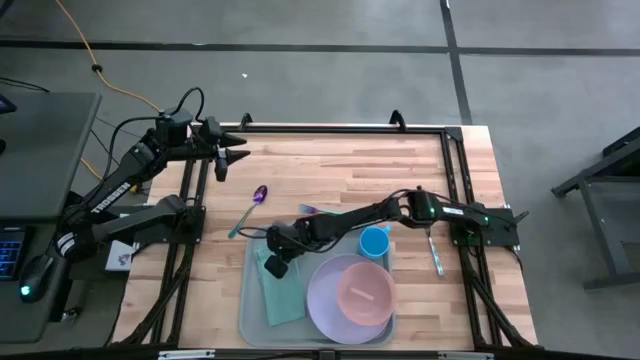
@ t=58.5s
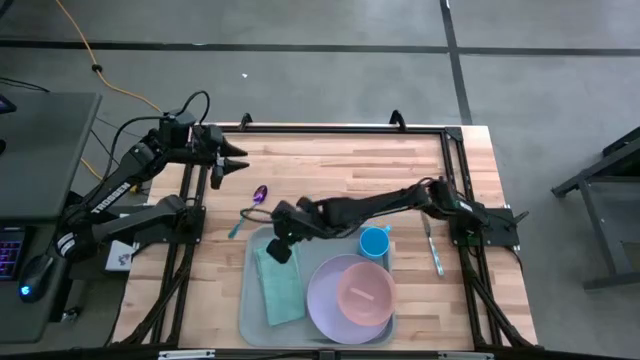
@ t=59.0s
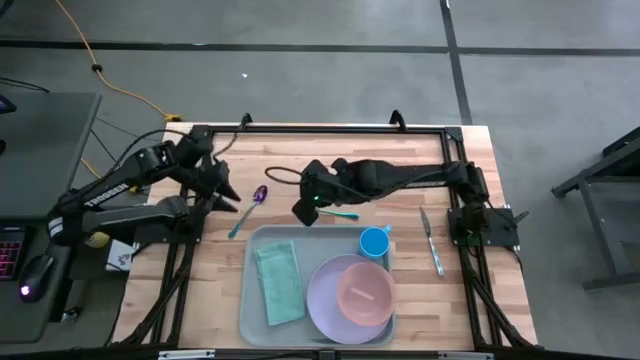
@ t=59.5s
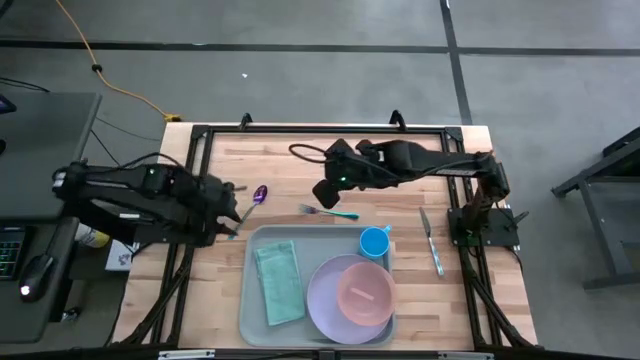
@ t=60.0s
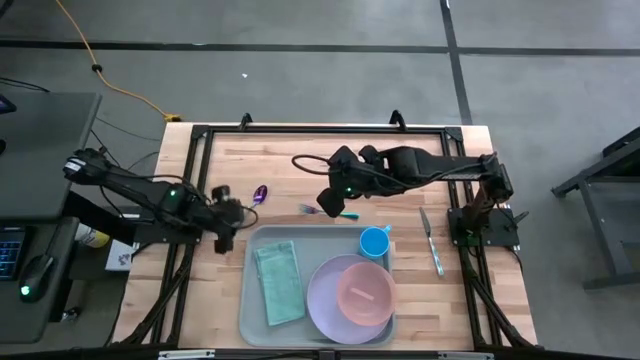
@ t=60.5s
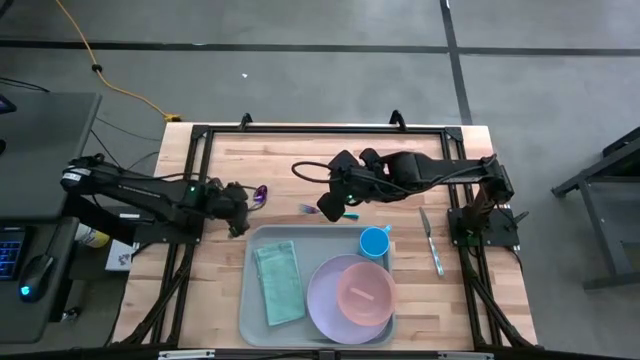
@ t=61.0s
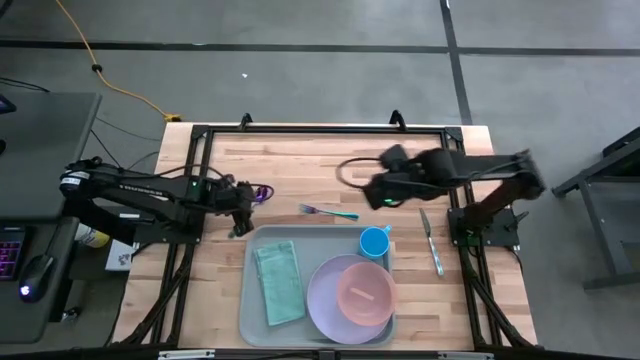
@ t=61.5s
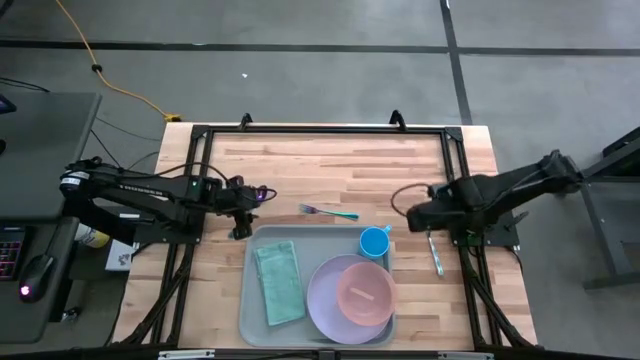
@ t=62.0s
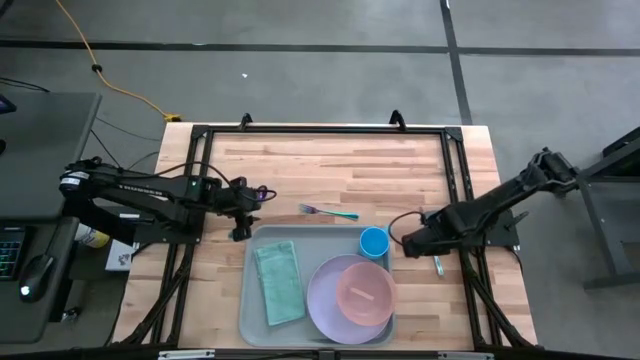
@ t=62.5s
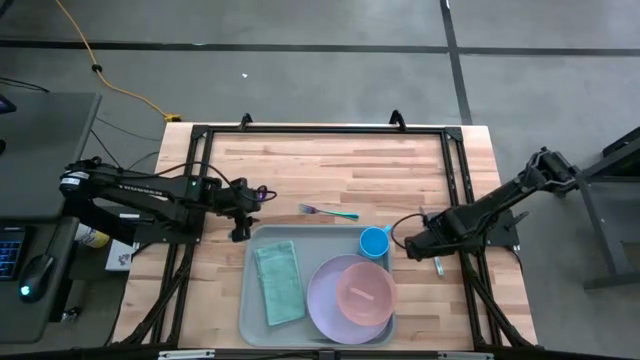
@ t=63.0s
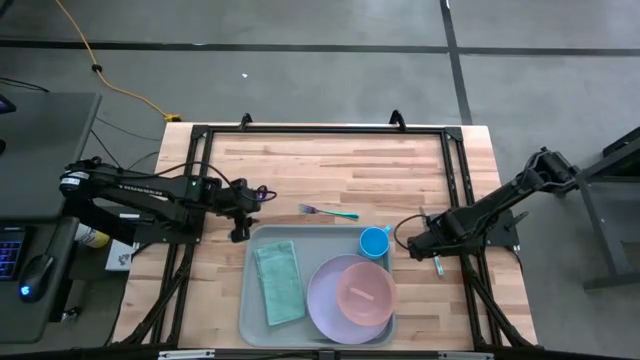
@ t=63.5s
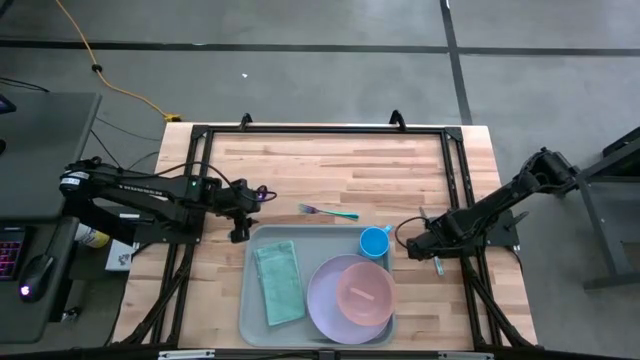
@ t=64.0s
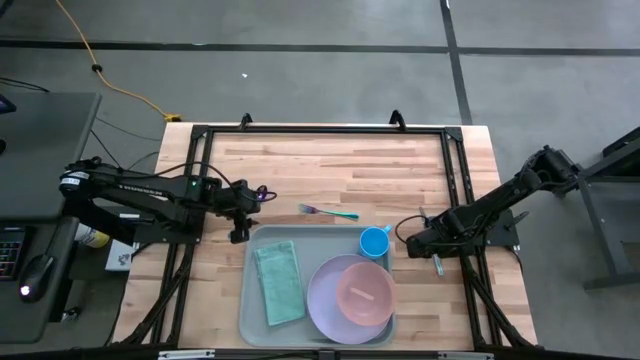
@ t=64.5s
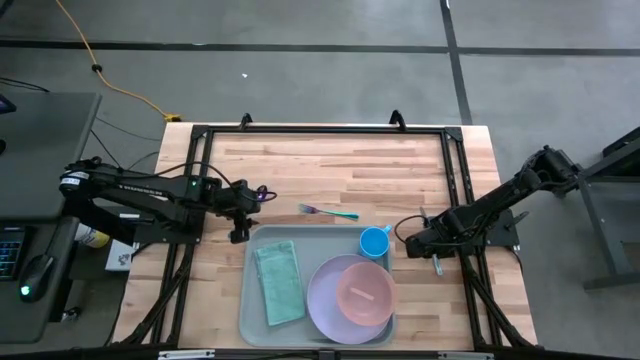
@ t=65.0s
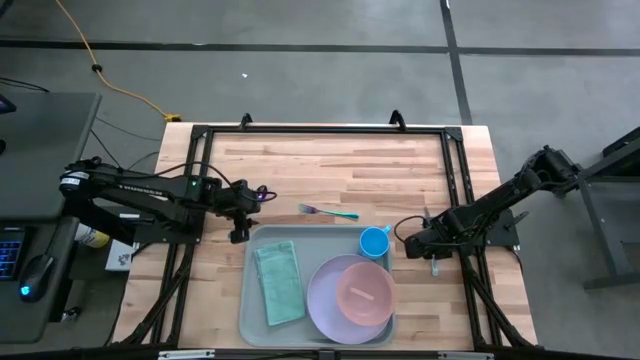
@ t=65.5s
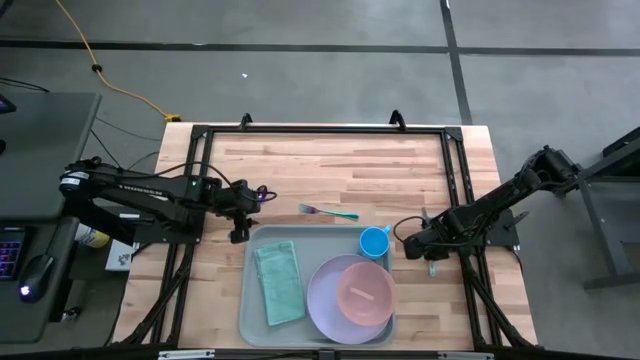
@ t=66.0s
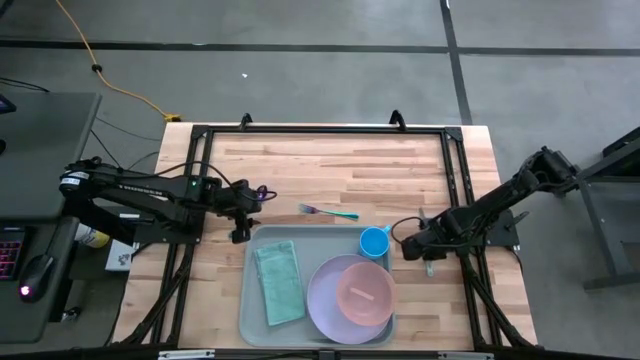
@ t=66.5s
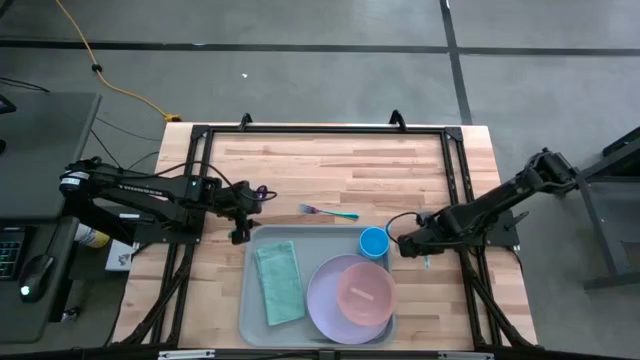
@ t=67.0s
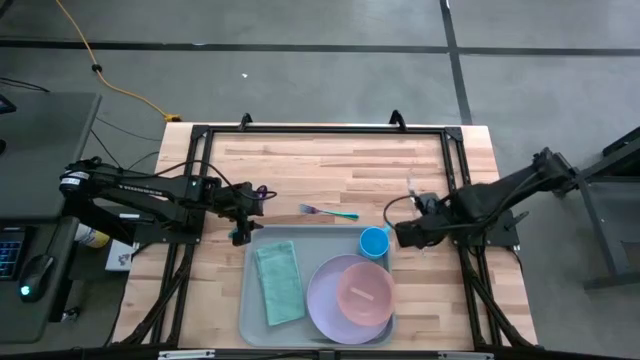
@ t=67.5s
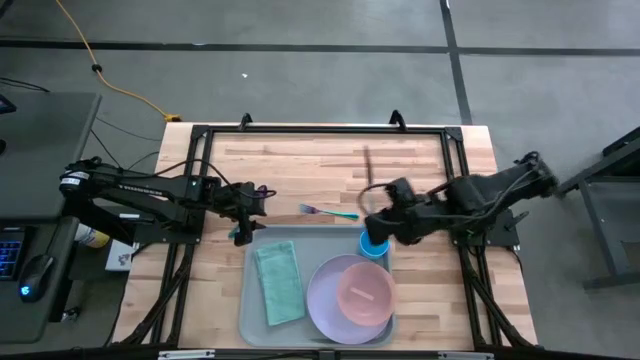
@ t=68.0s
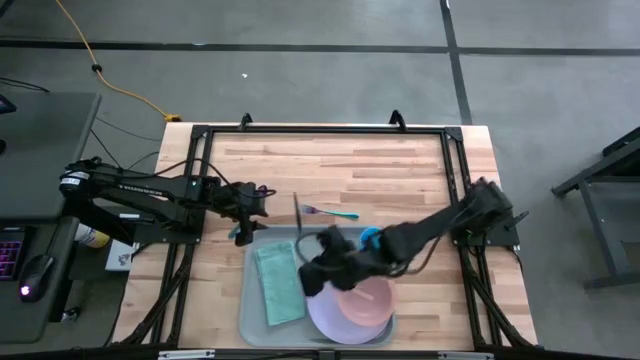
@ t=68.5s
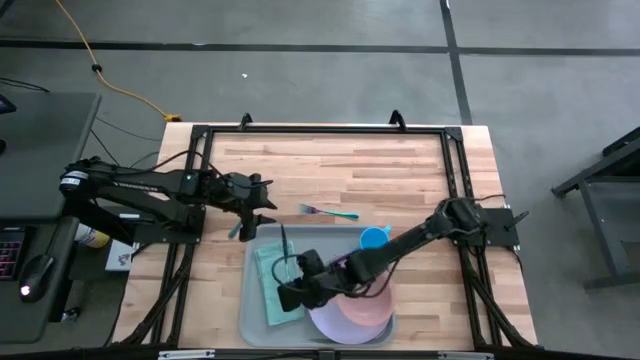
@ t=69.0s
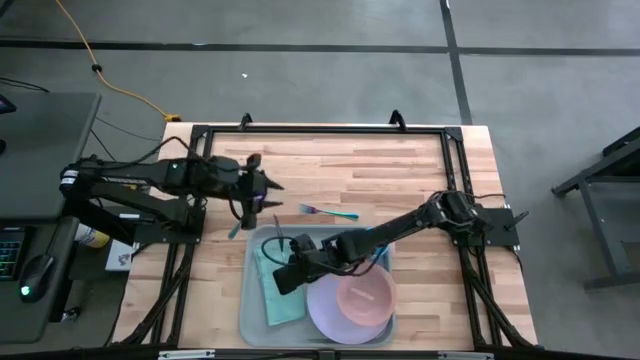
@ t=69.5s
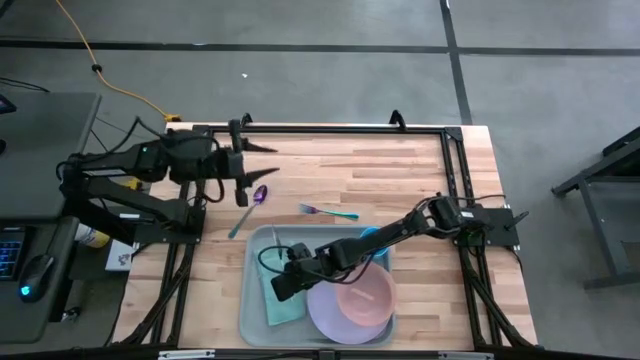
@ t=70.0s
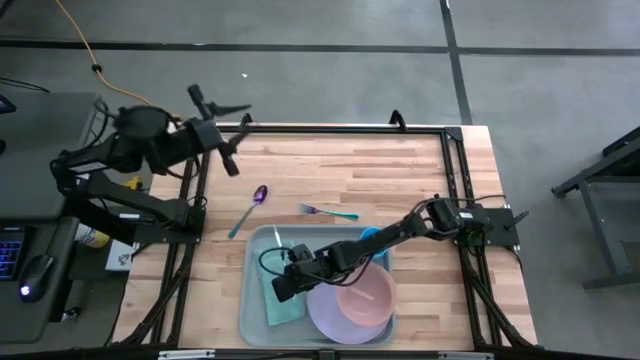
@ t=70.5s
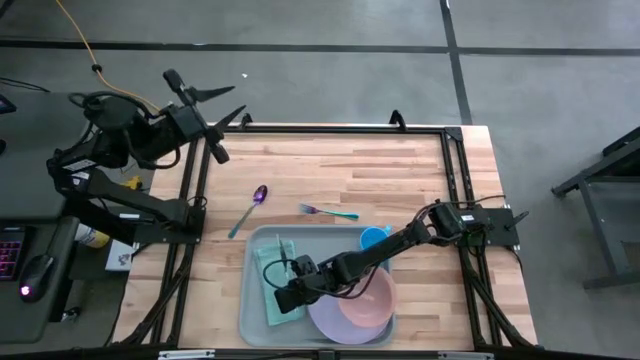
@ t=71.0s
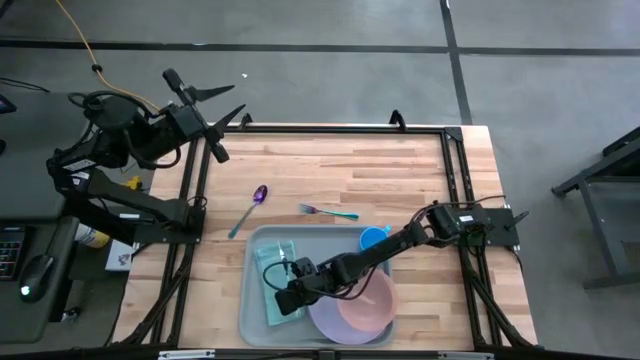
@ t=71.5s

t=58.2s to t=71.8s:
Task: Set up tray
Put the green patterned knife on the light blue napkin

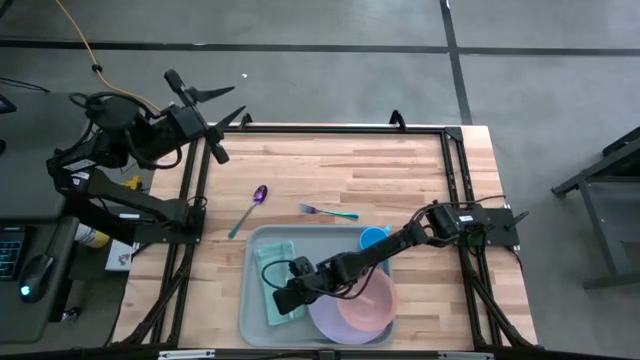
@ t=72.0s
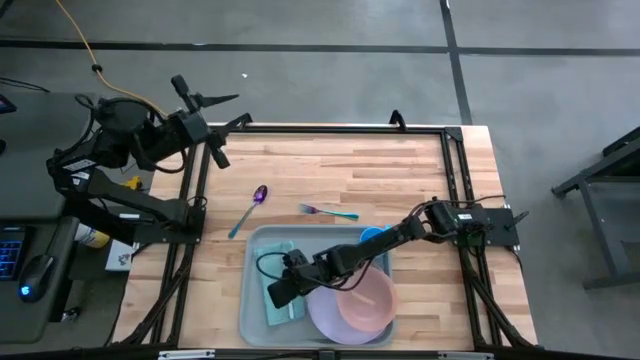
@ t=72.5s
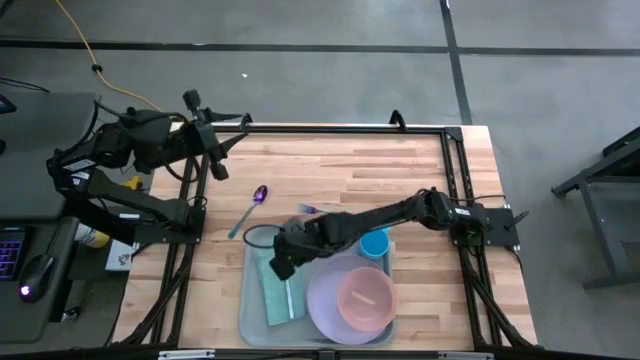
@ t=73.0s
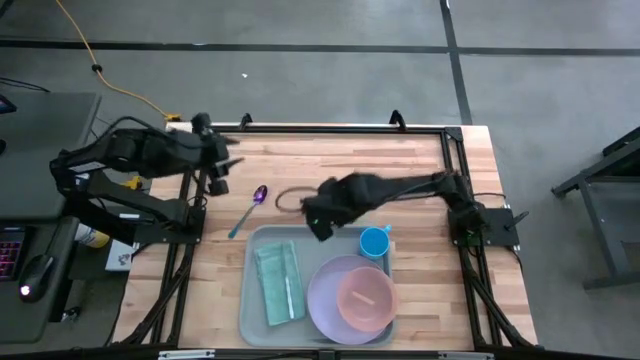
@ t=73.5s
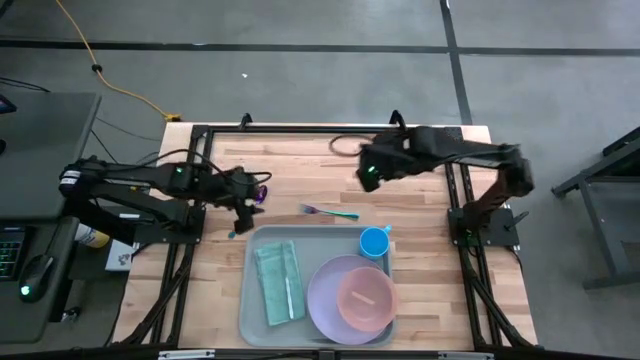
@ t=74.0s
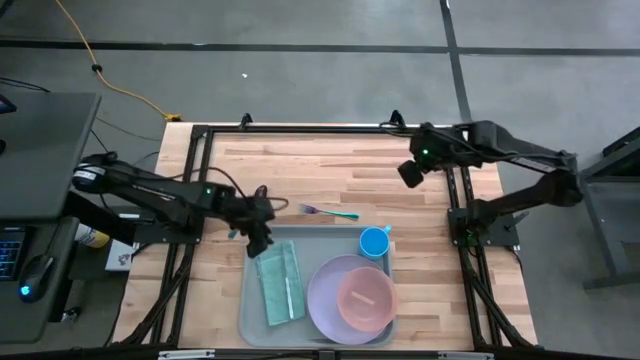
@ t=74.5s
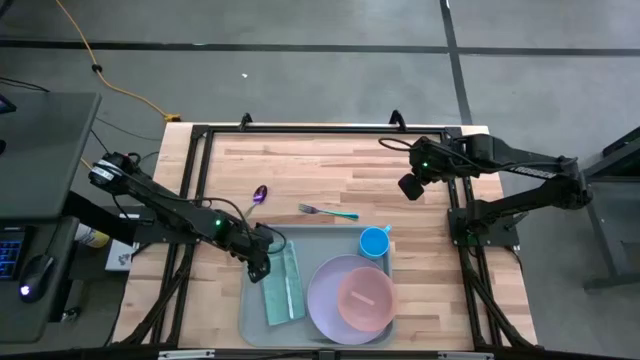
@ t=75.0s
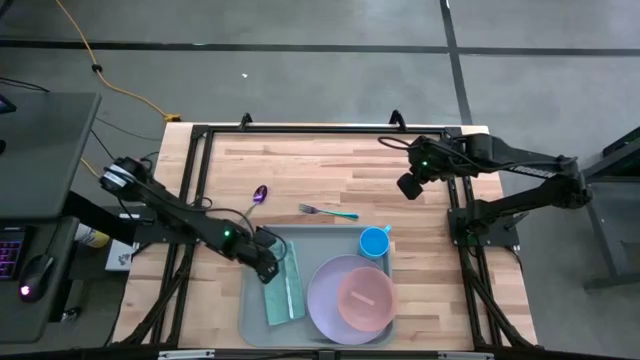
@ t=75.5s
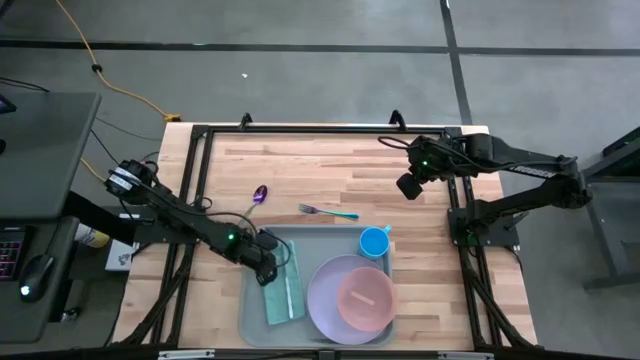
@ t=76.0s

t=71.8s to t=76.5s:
Adjust the light blue napkin on the gray serving tray

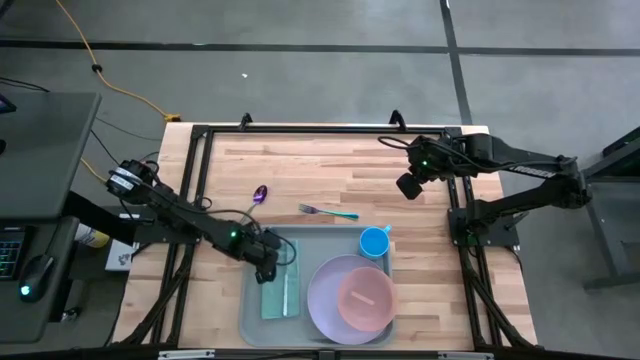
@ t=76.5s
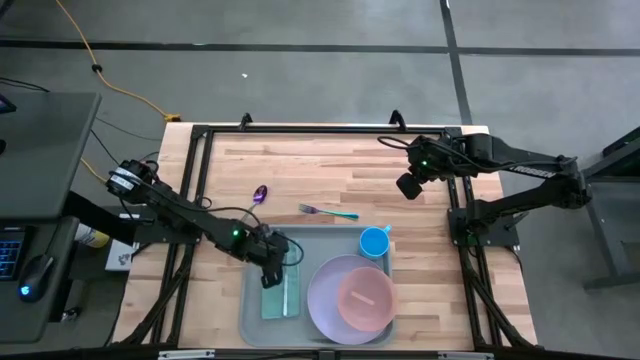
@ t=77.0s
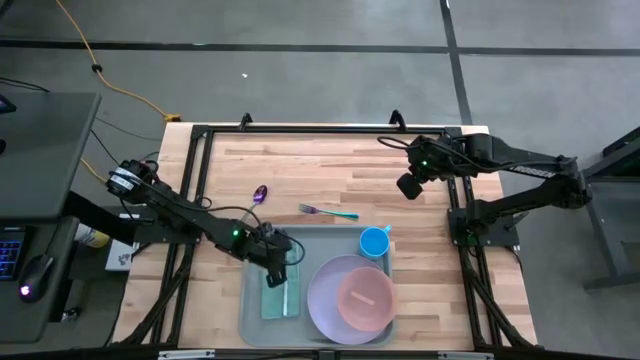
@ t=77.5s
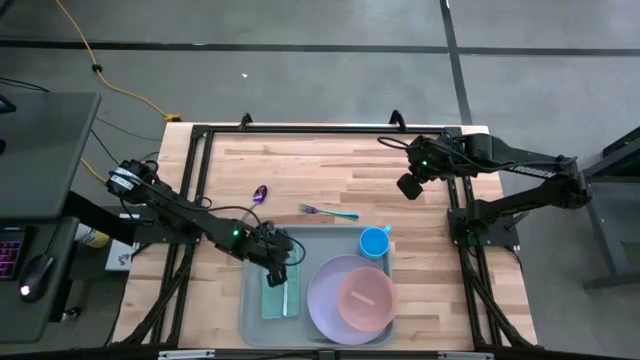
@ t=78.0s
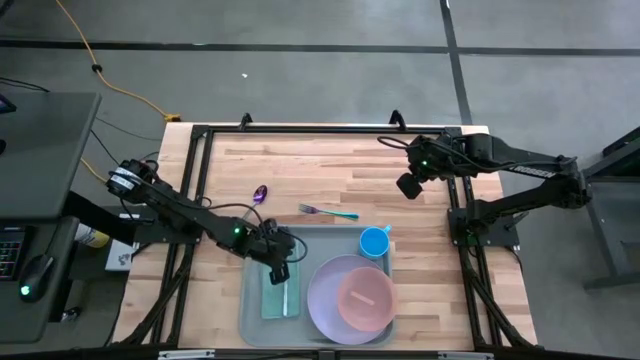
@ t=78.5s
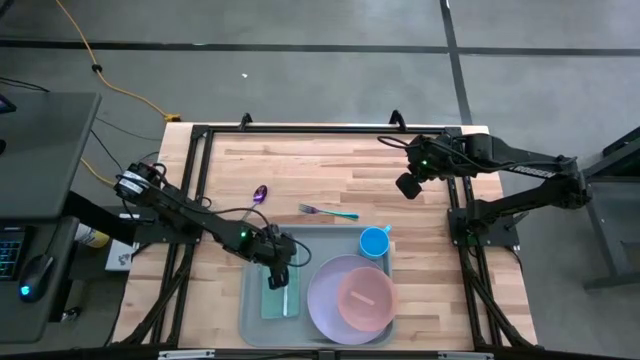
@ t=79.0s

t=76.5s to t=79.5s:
Adjust the green patterned knife on the light blue napkin
